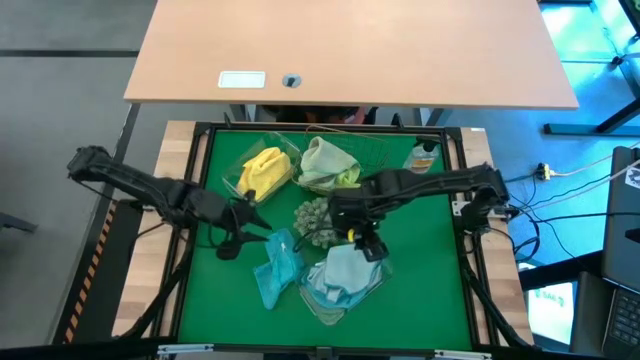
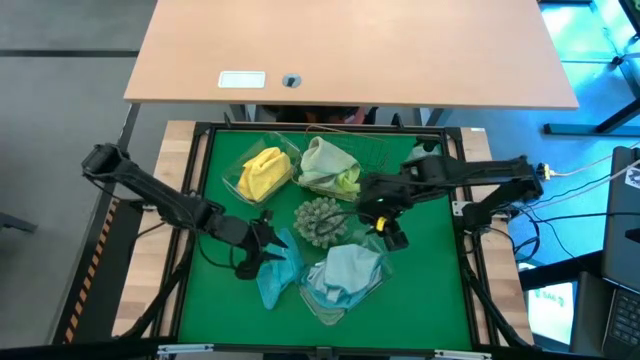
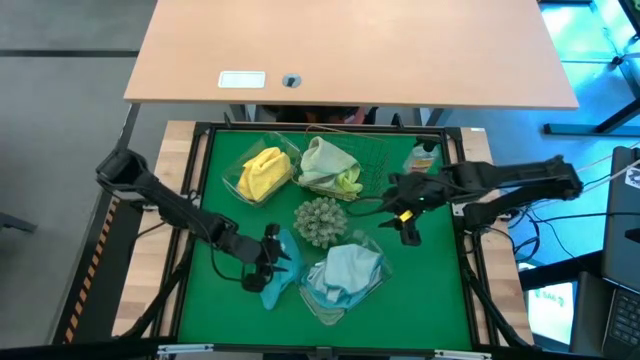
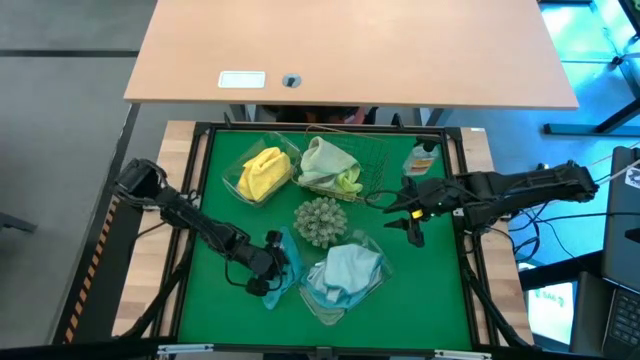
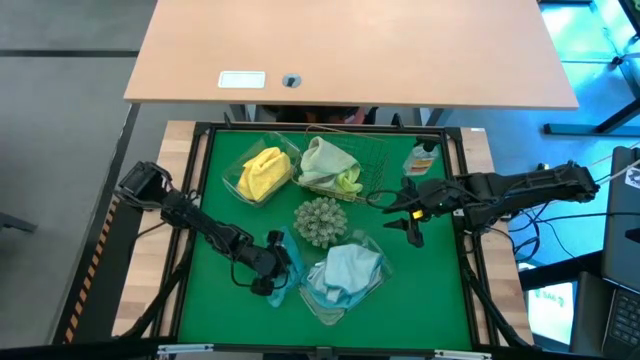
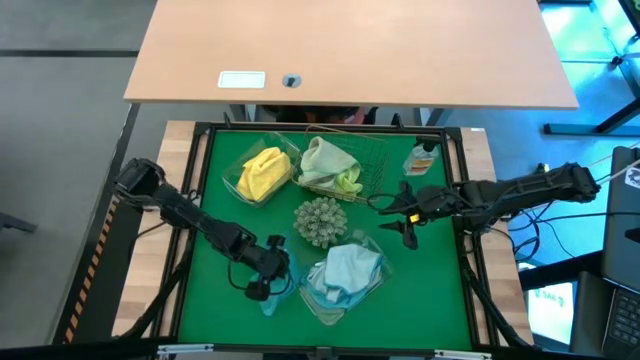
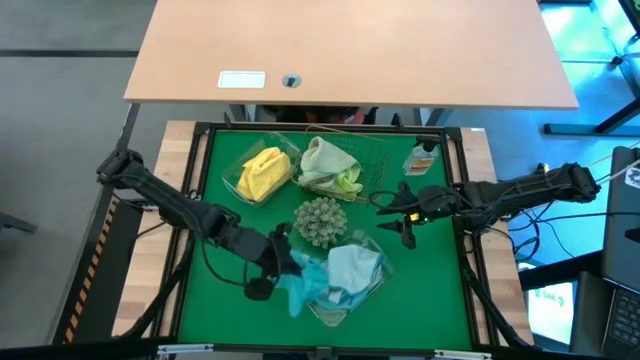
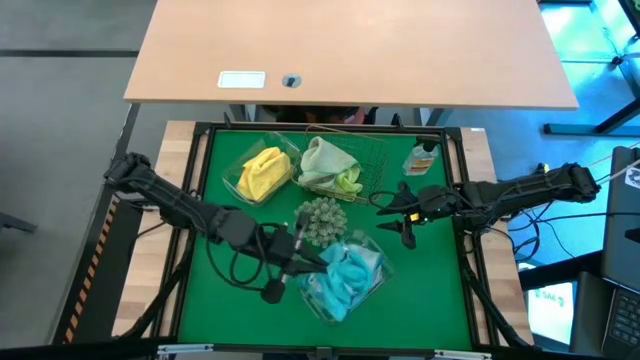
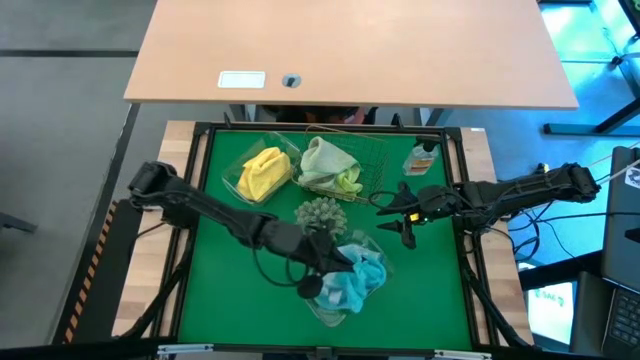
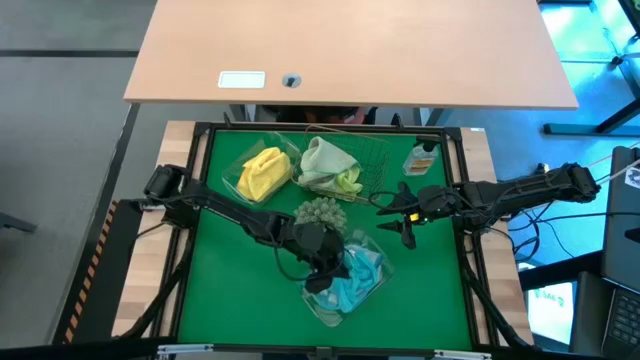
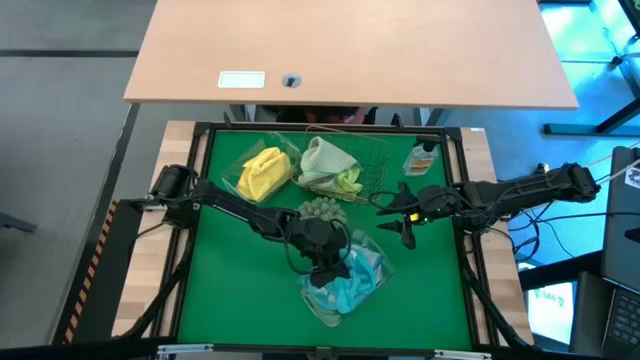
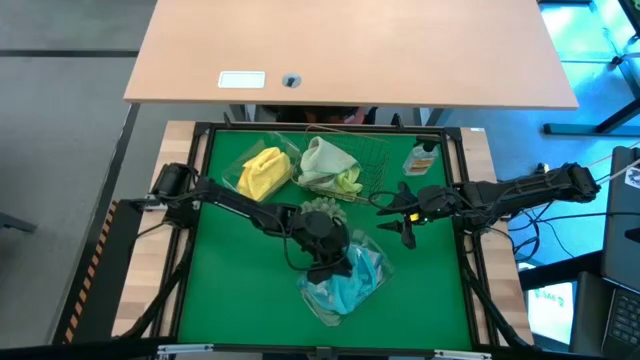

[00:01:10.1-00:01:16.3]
Task: Sort microfiber towel by color & place in baskets
Put the blue microfiber towel into the bottom transparent bin

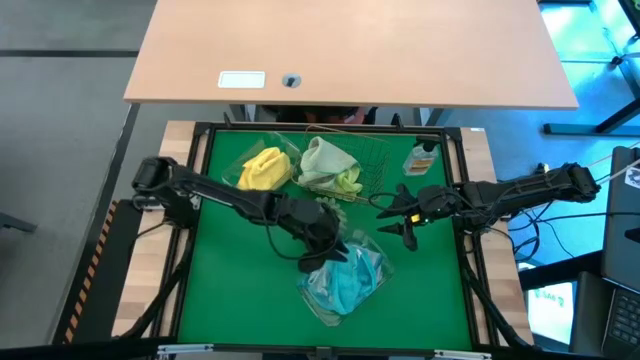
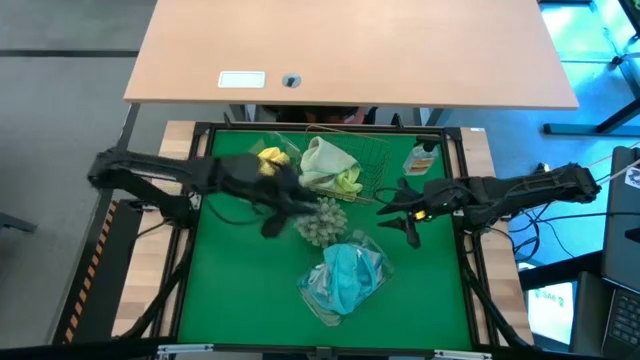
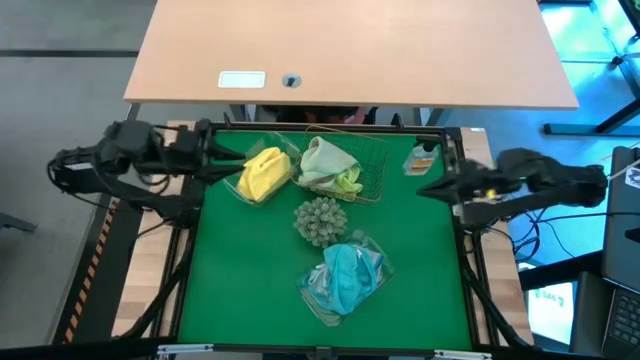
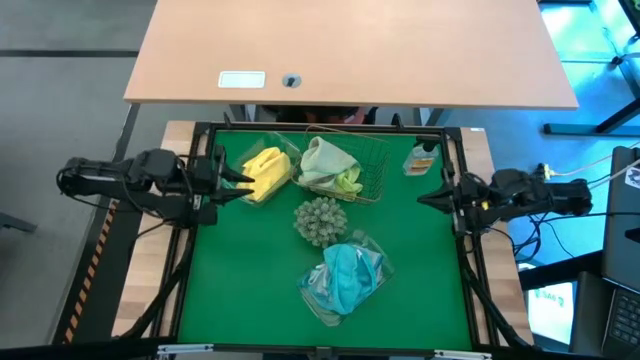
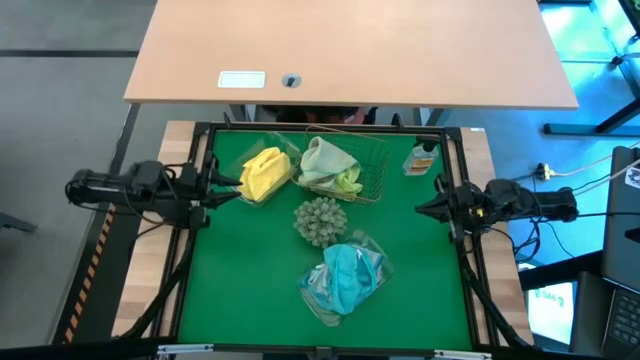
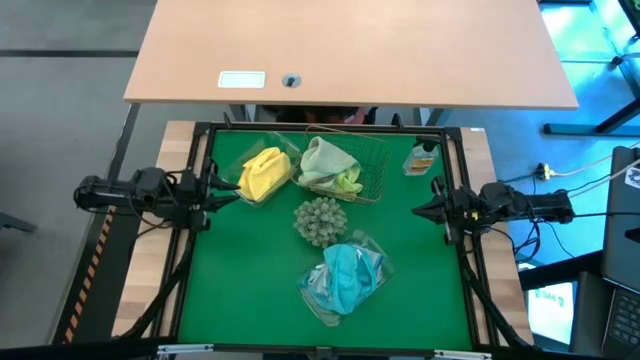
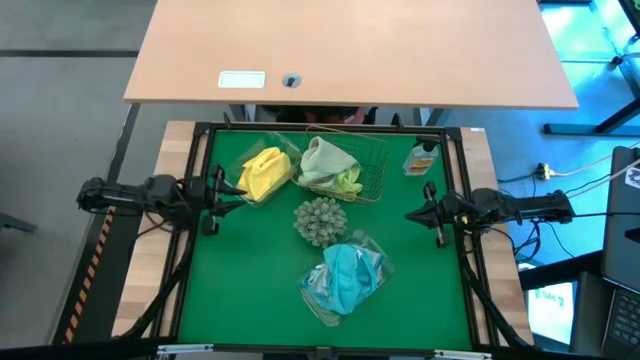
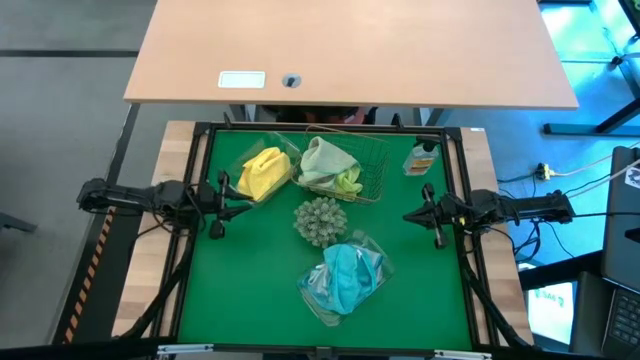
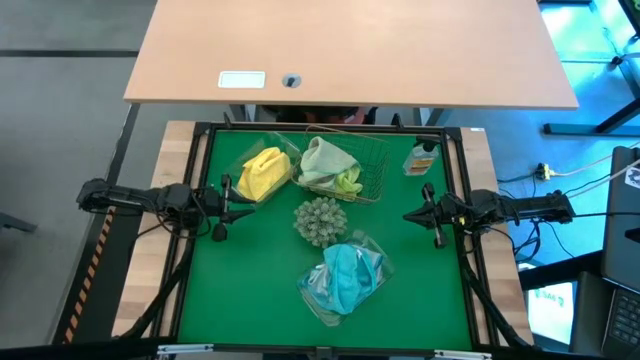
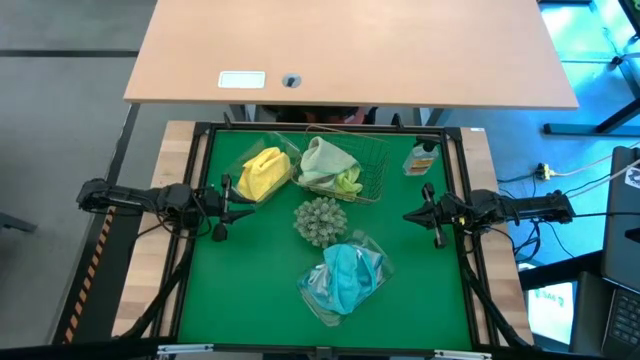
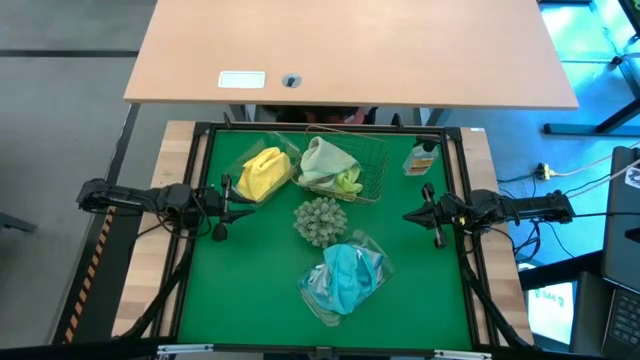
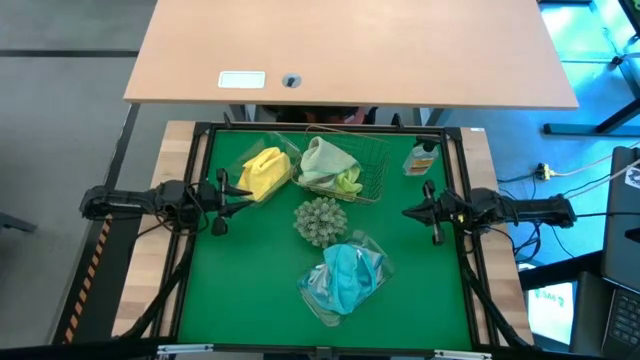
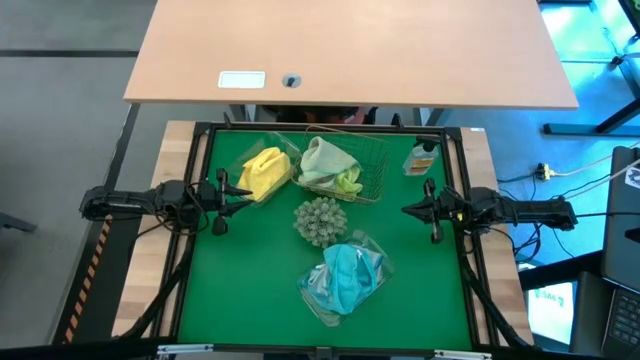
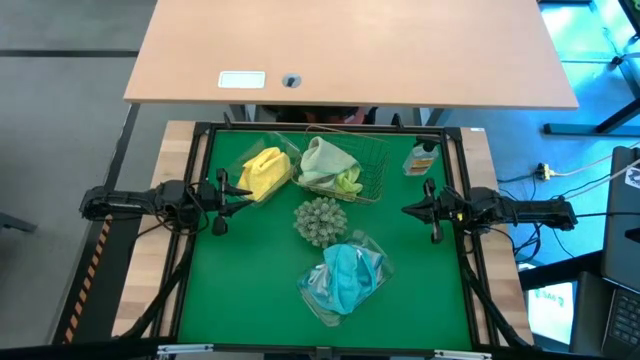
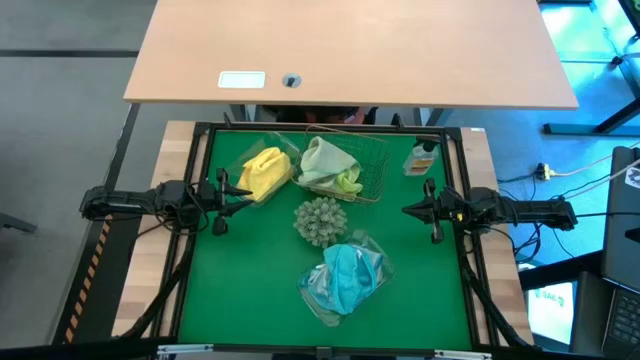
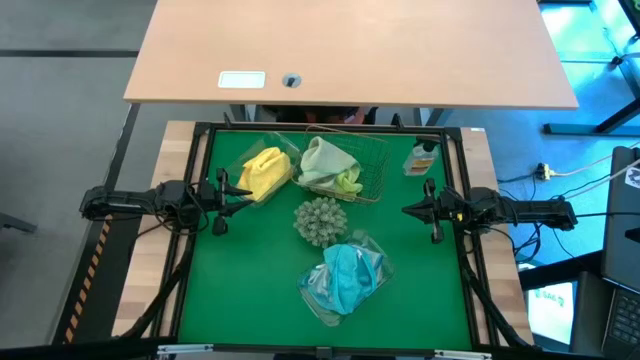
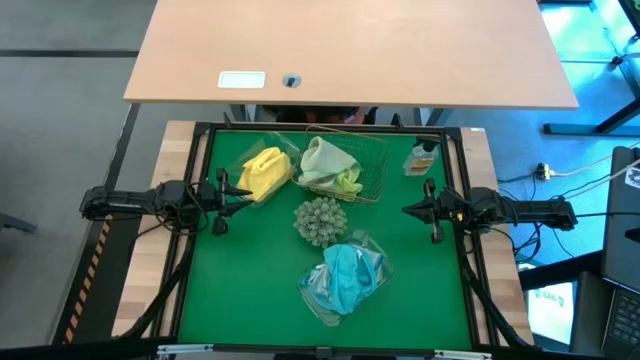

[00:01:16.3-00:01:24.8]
Return to Home Position

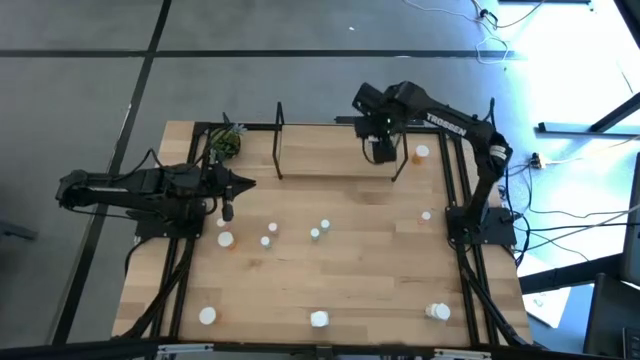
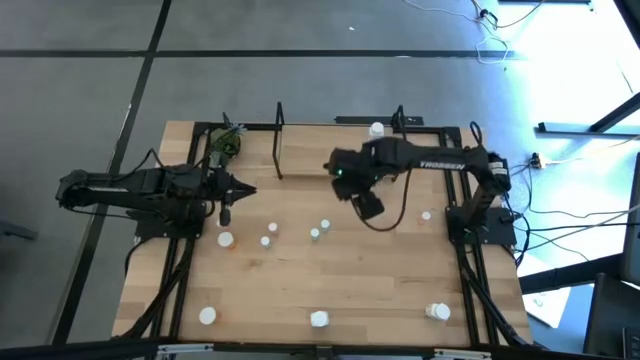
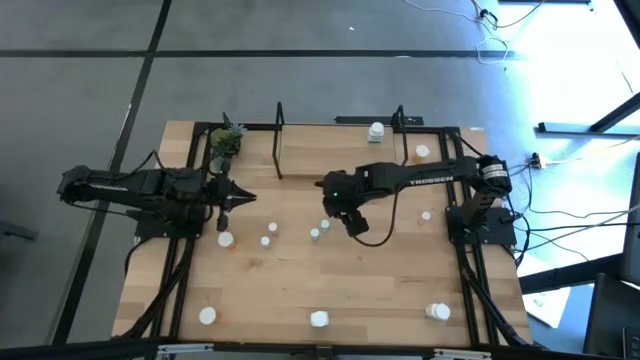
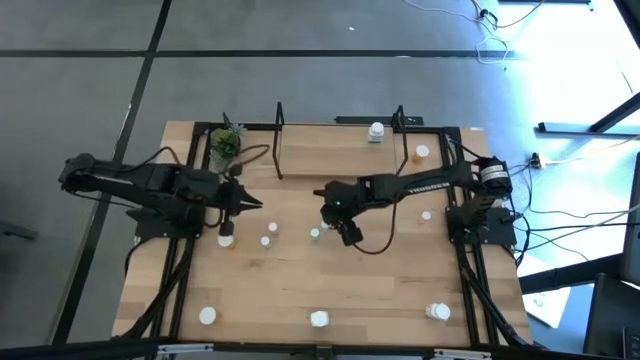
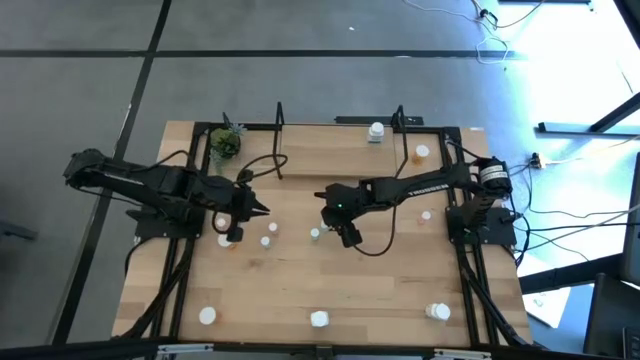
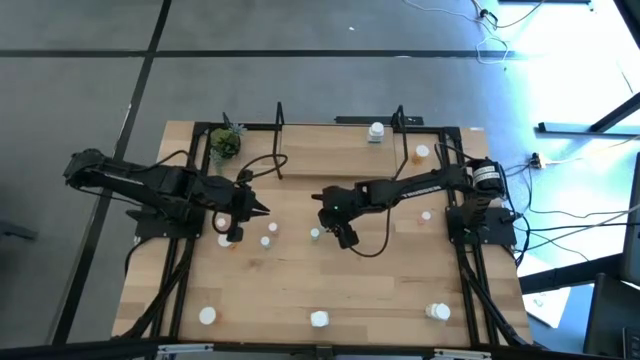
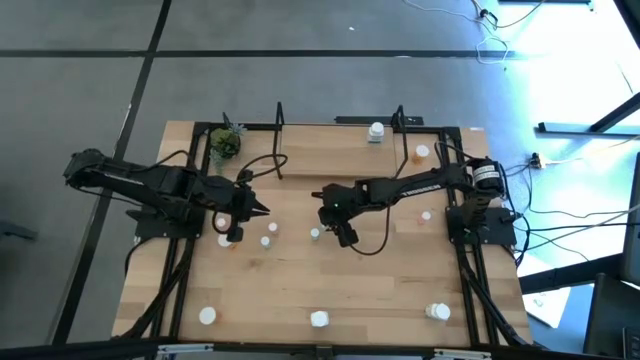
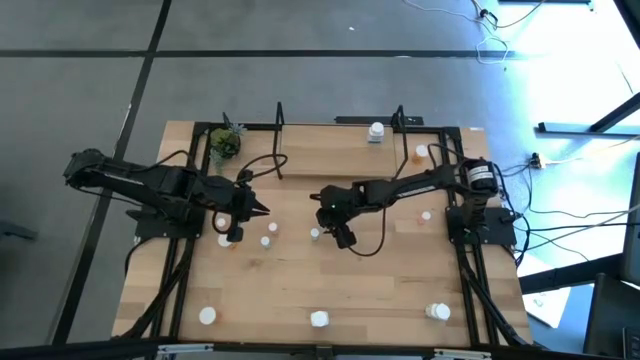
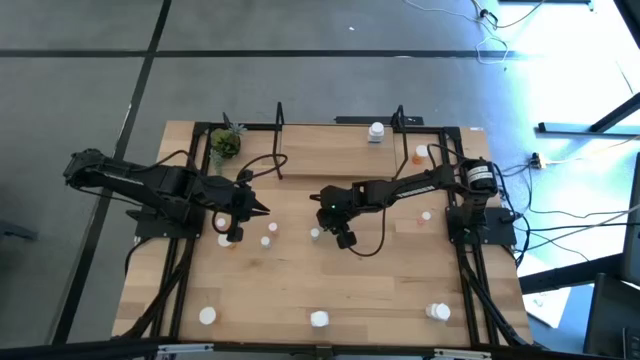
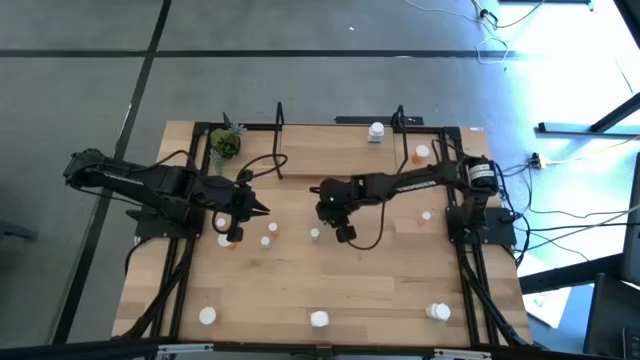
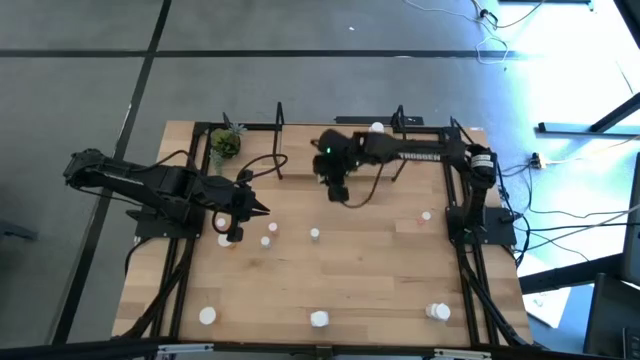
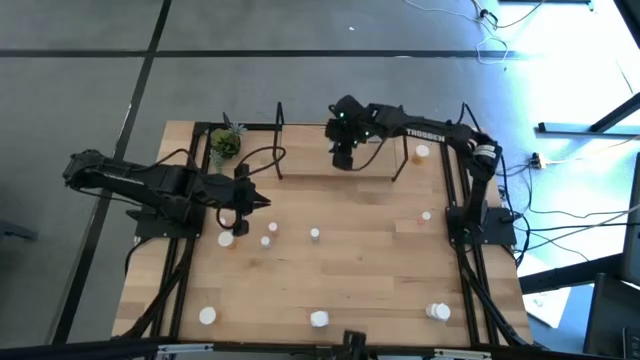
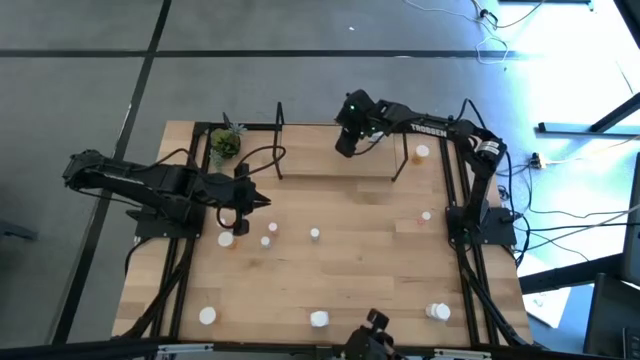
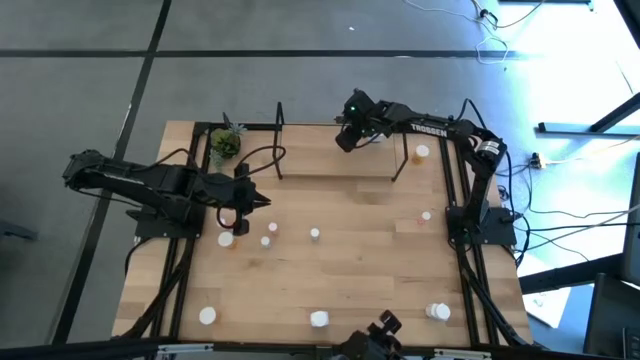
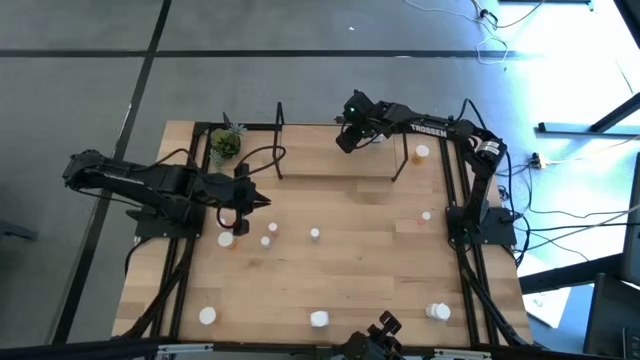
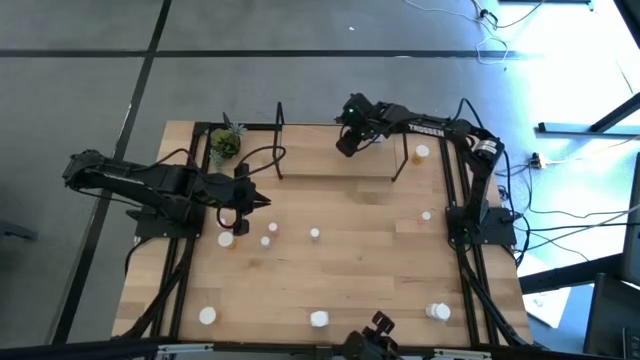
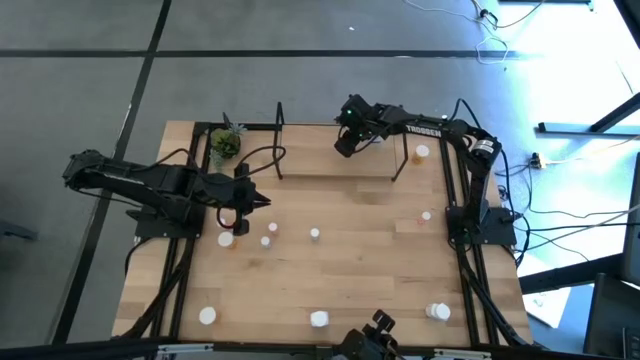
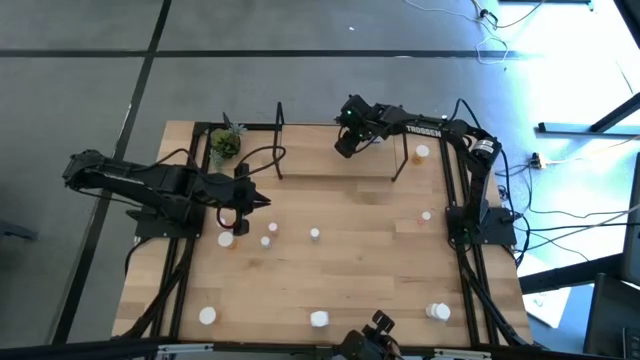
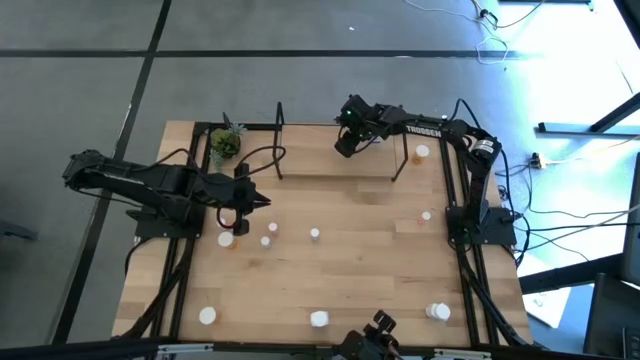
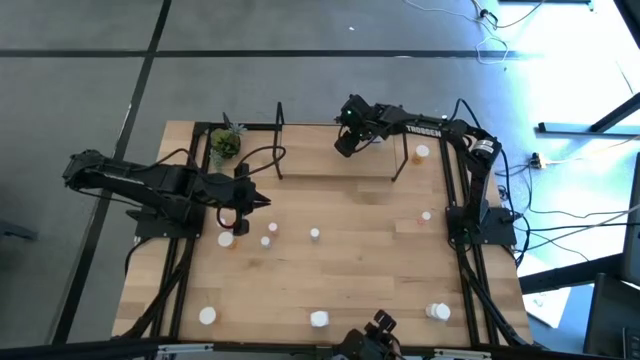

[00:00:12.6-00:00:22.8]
Task: Pick and place medicine bottles onto shelf by color
Put the top green pill bottle on the shelf
